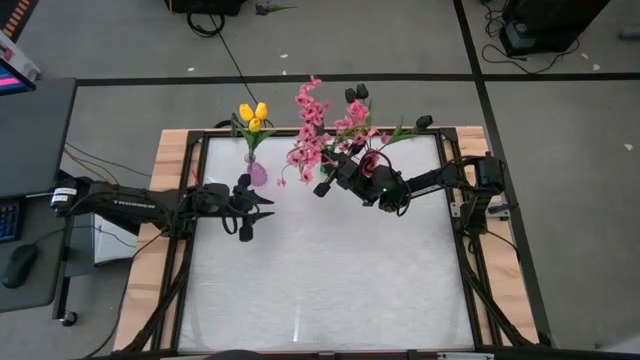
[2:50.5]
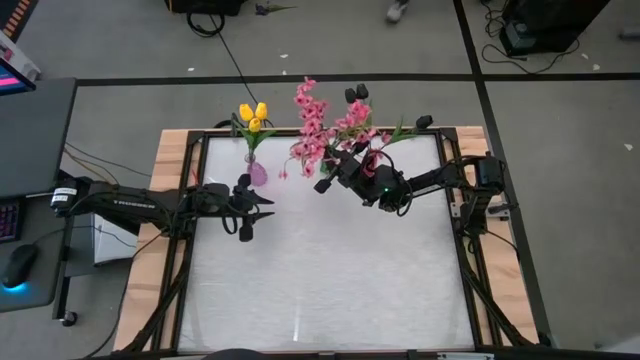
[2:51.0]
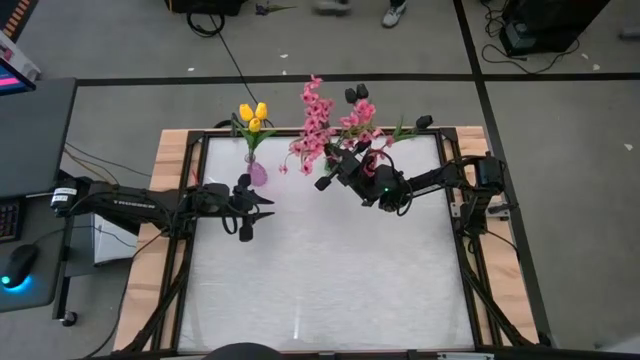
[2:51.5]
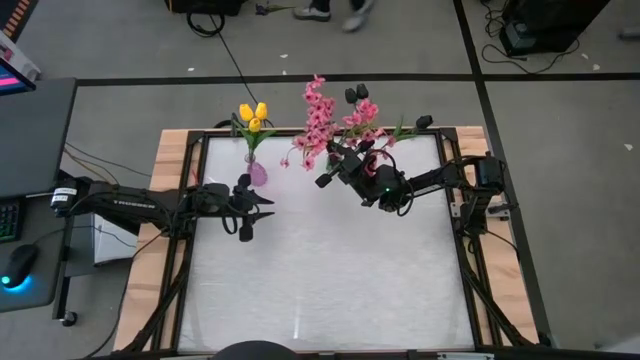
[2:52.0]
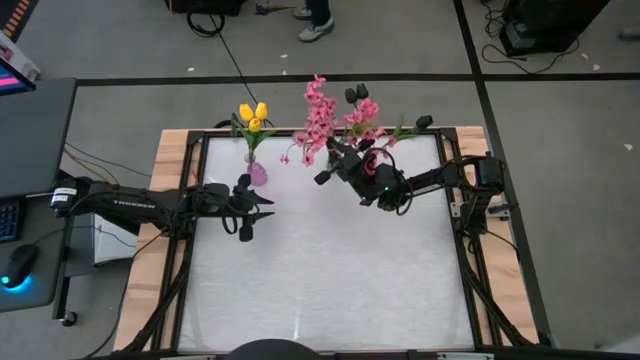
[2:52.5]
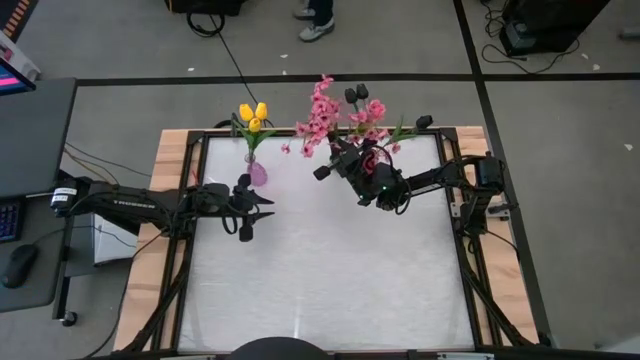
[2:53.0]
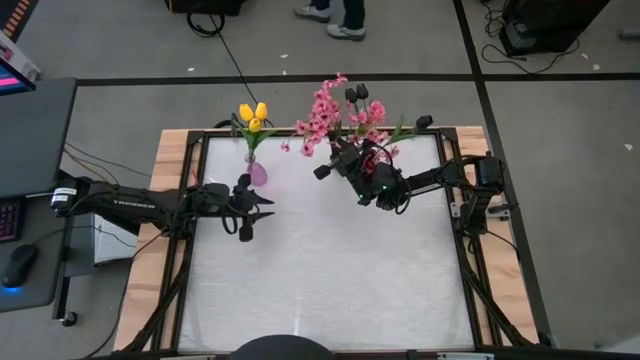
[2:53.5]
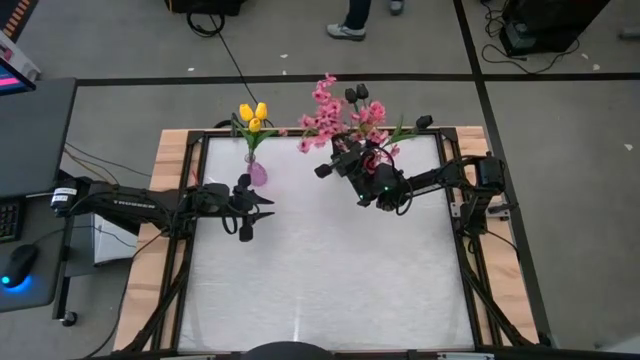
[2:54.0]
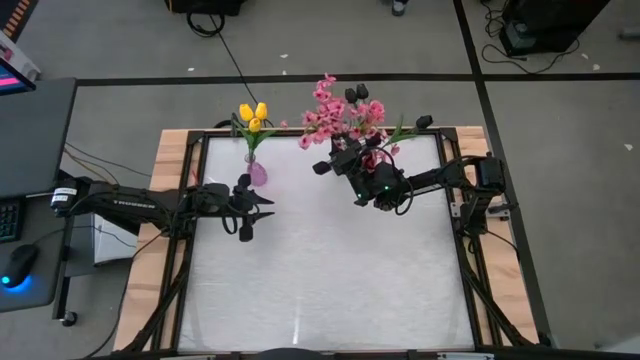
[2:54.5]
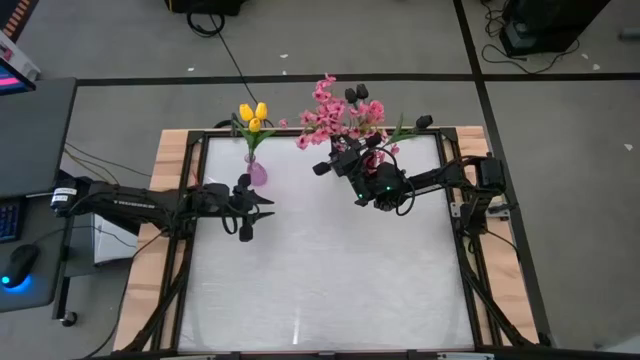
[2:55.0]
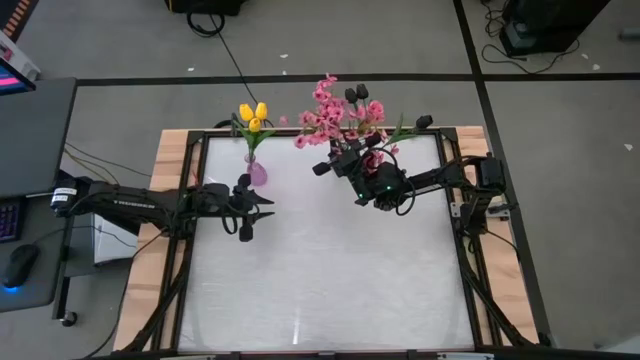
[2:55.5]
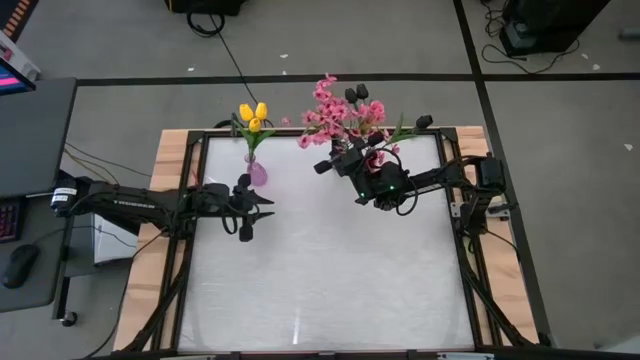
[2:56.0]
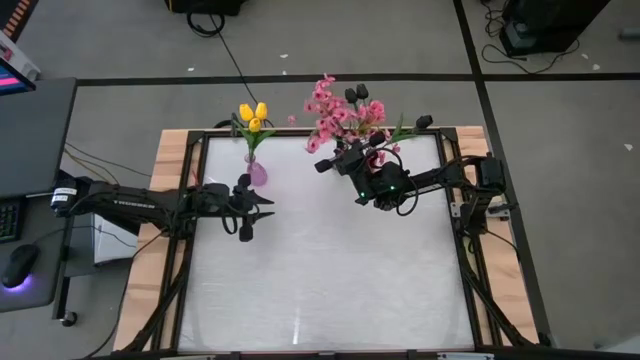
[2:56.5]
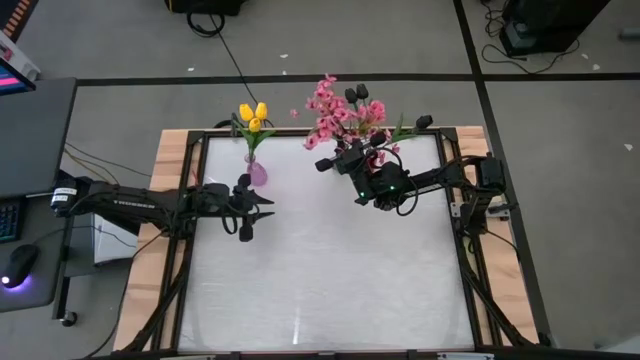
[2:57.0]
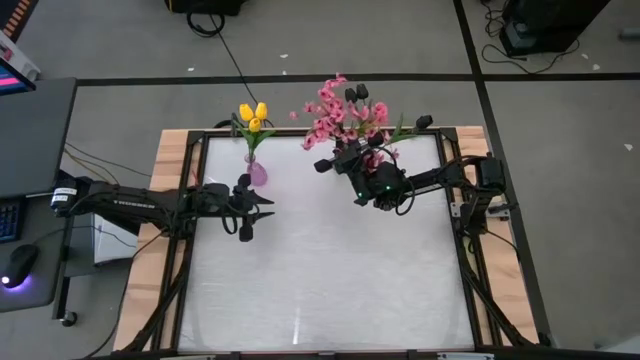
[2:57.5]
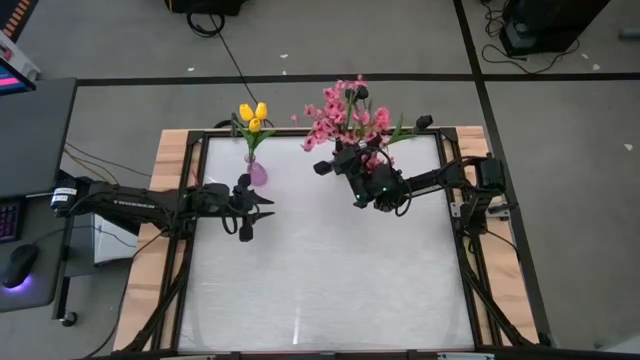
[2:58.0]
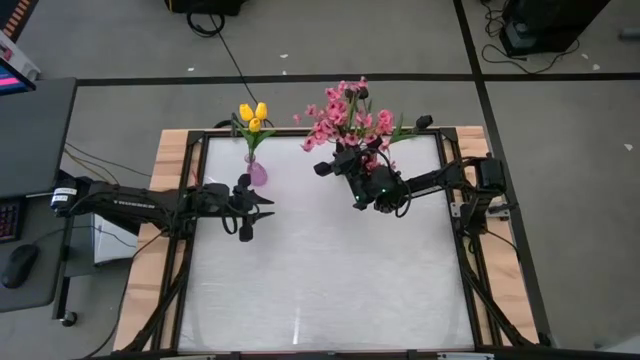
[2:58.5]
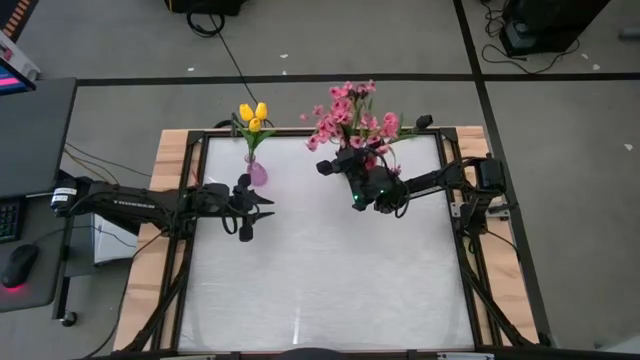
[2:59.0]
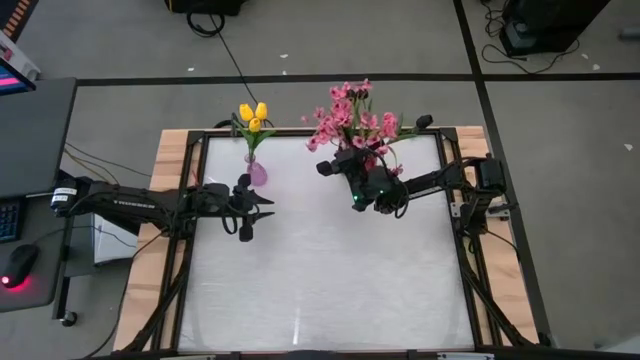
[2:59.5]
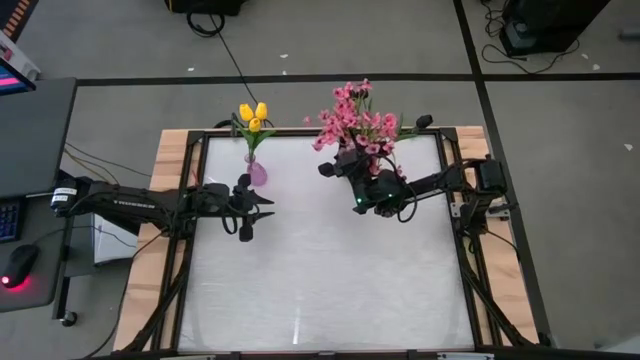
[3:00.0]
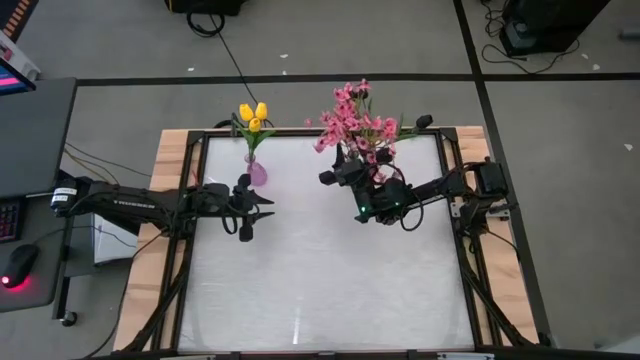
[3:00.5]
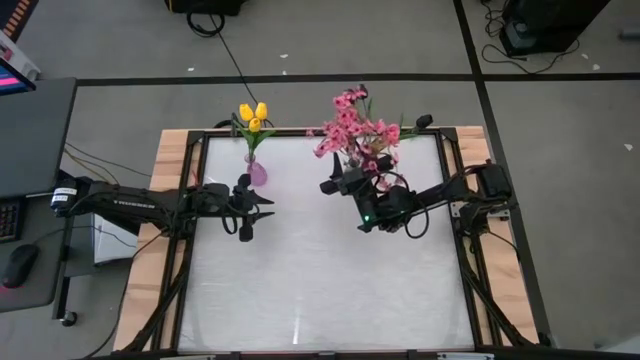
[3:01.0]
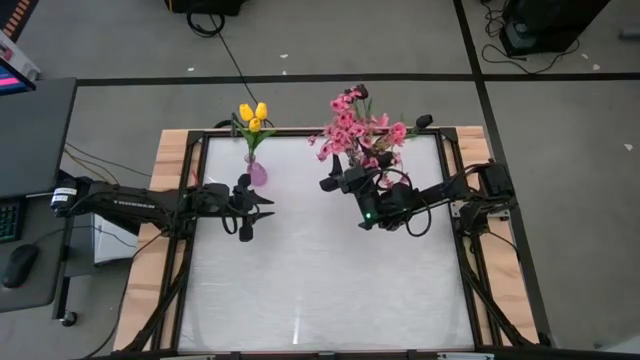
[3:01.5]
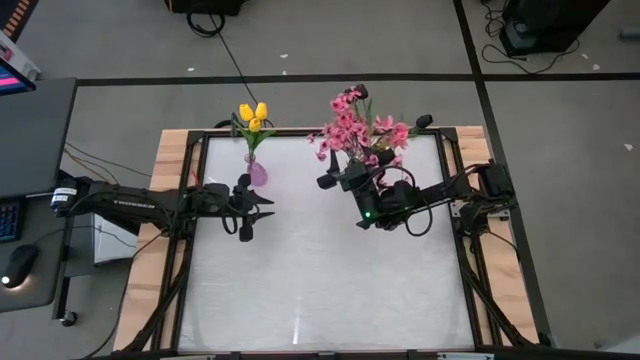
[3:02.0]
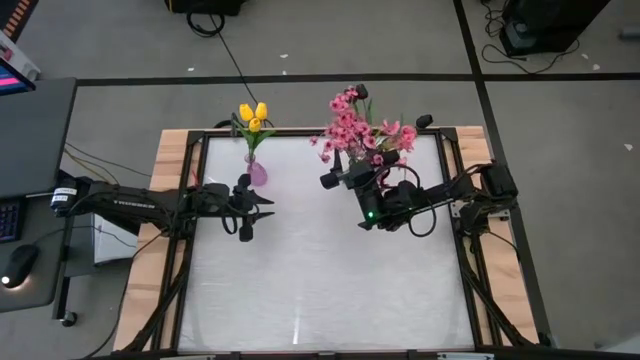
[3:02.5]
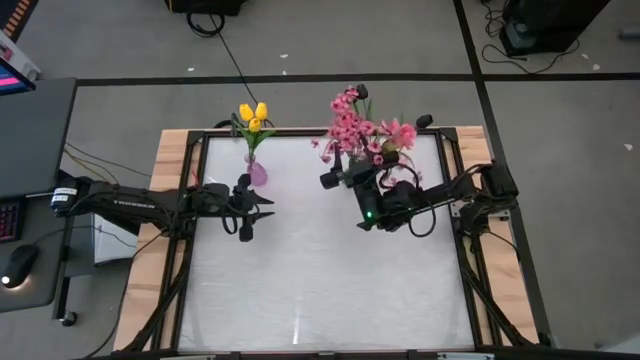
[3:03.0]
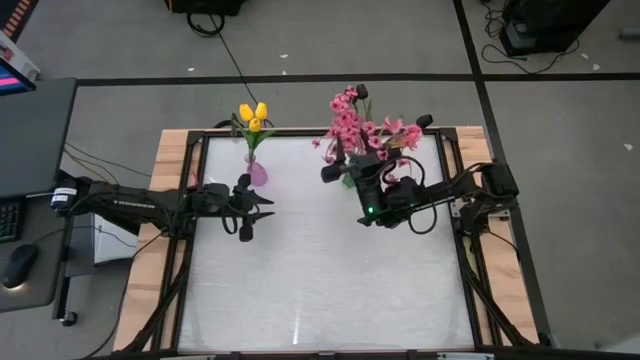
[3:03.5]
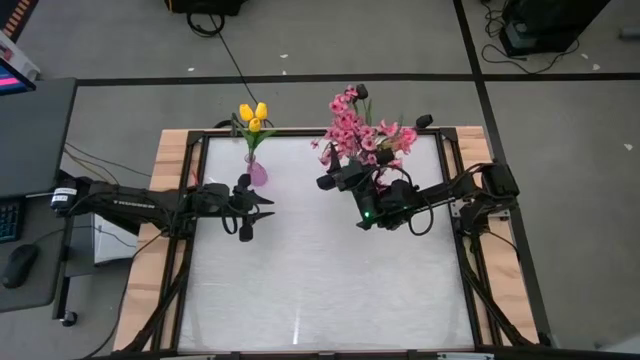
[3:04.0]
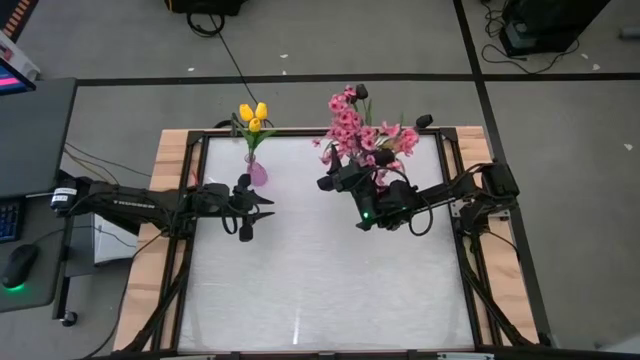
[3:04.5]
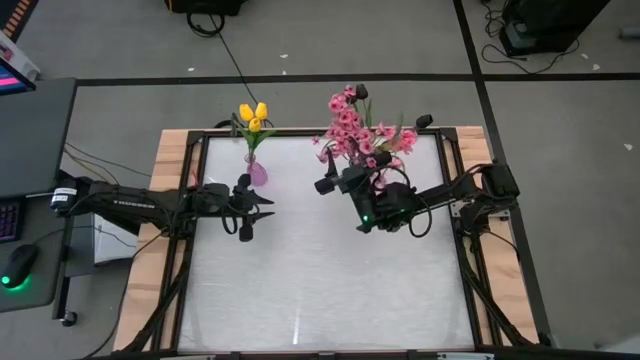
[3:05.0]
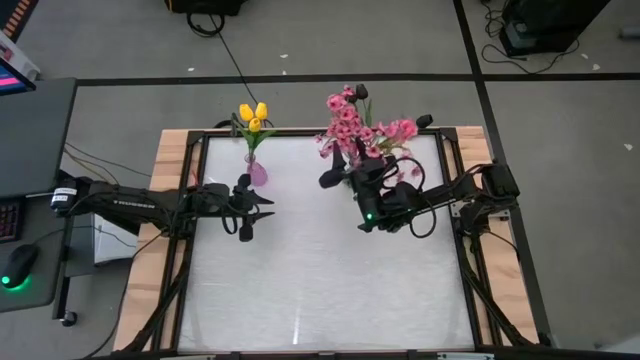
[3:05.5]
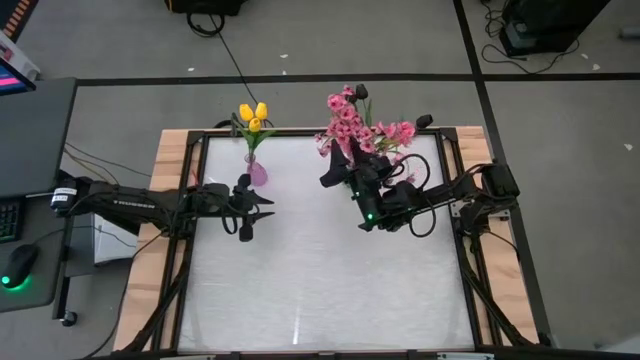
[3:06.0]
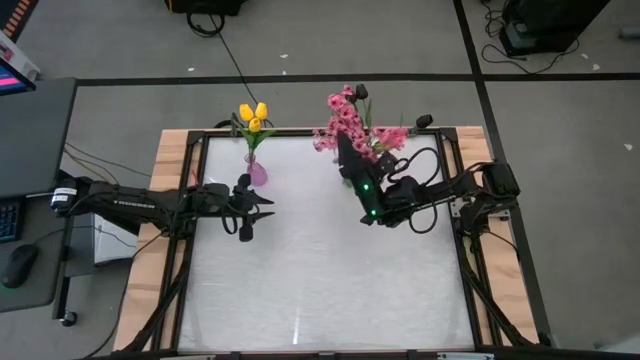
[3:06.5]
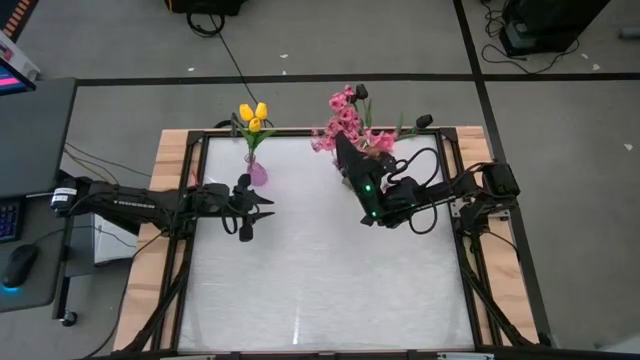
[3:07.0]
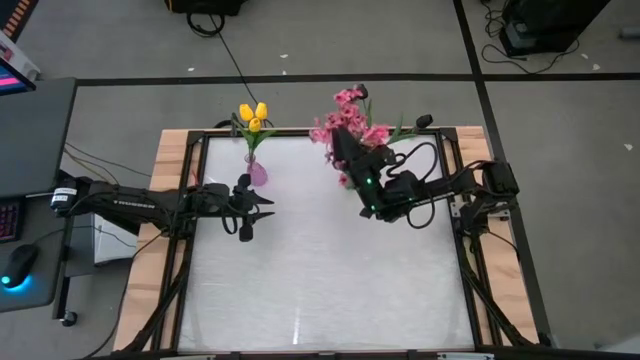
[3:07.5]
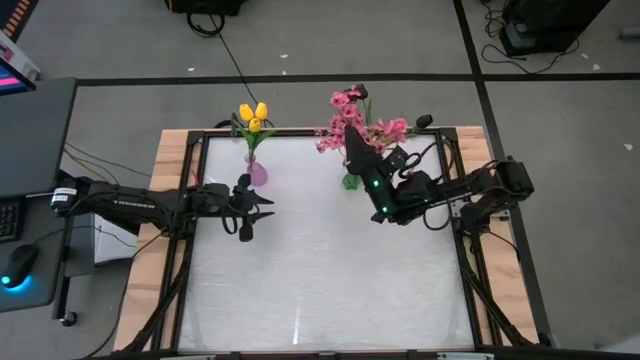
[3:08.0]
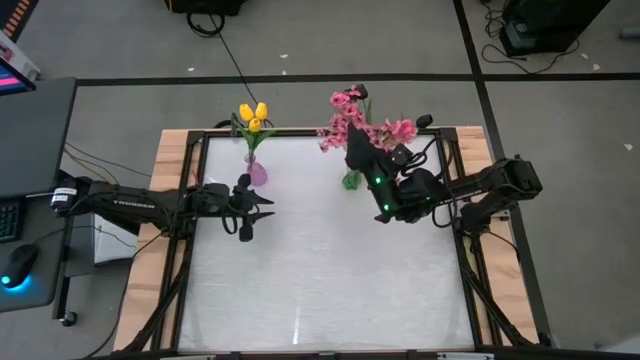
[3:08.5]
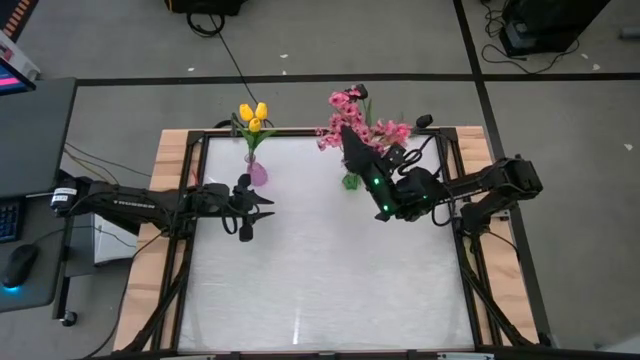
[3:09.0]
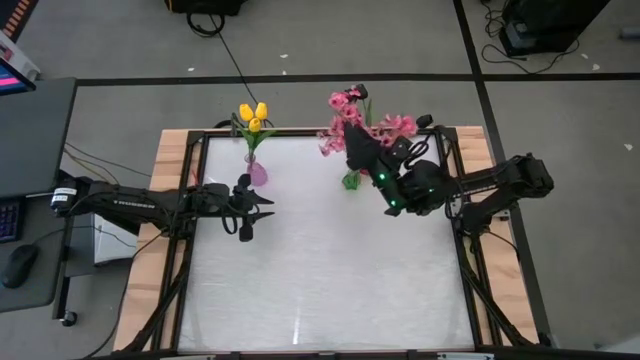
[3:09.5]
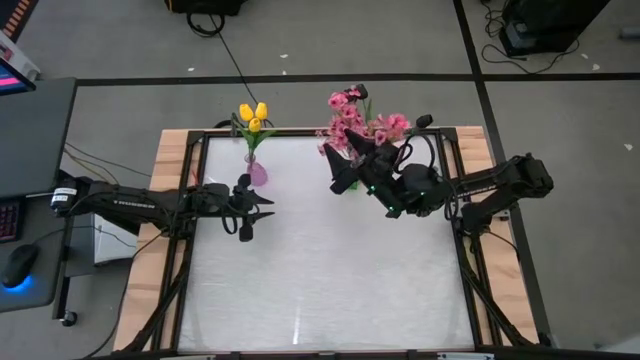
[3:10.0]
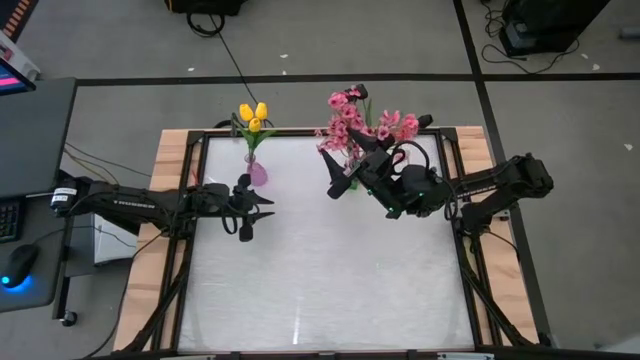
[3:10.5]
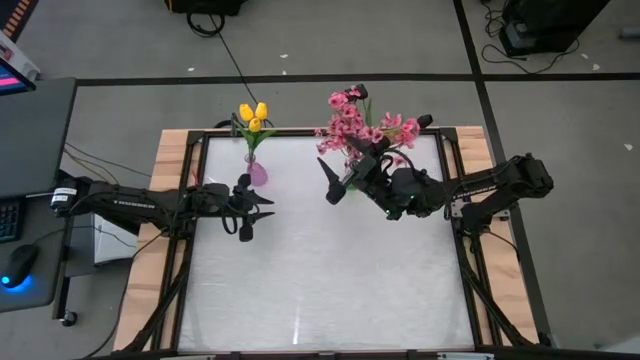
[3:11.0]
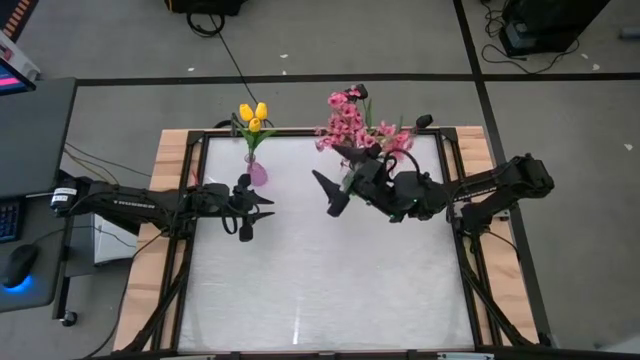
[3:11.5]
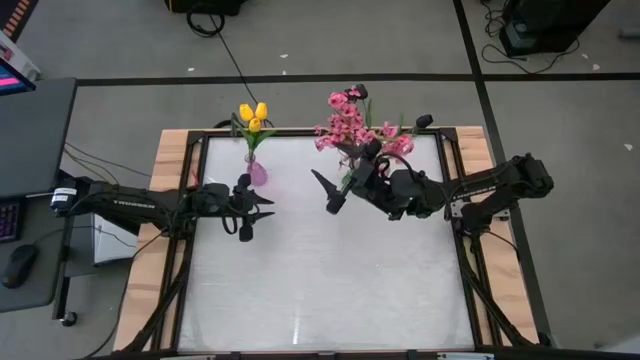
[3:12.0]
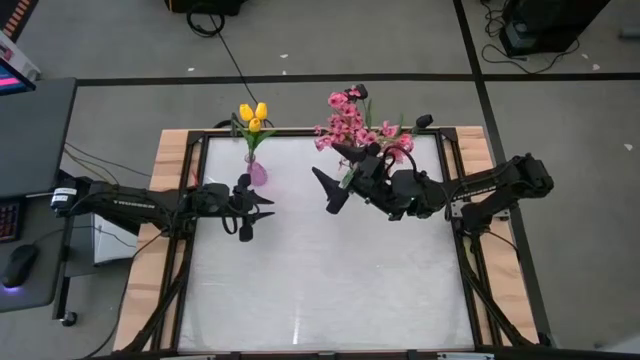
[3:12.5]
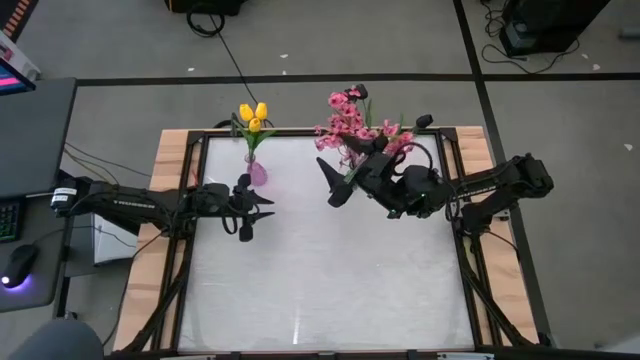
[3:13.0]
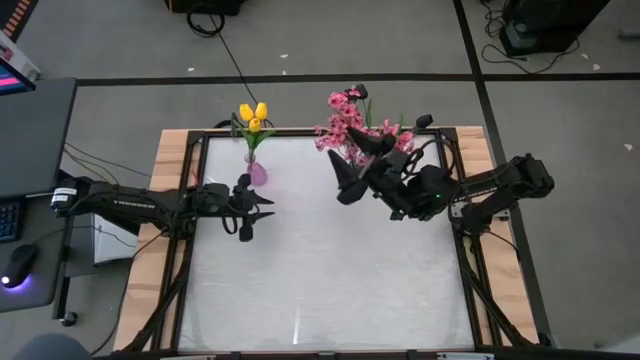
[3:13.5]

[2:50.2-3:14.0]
Task: Sort flowers into vase by color
Put the pink flower into the green vase
